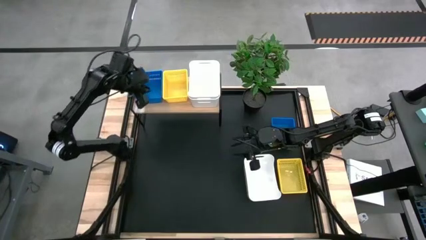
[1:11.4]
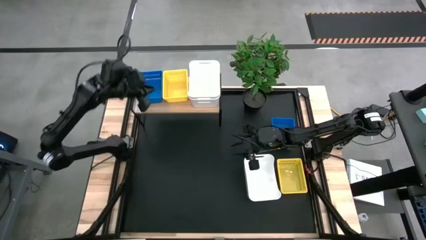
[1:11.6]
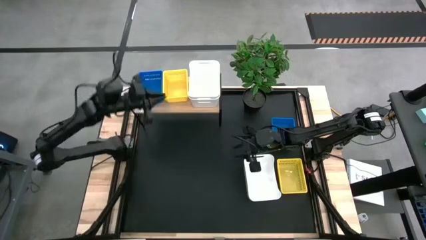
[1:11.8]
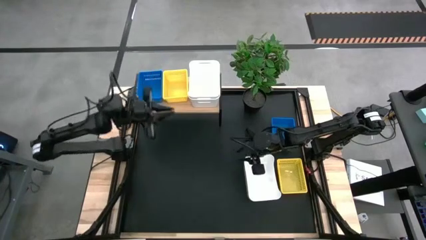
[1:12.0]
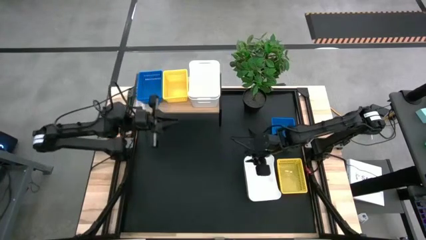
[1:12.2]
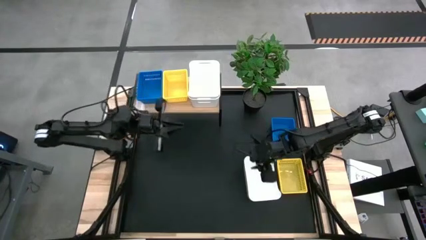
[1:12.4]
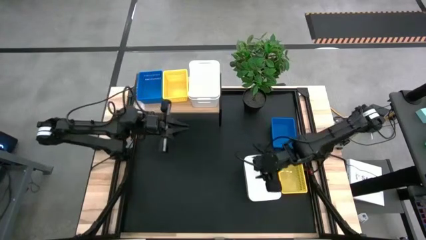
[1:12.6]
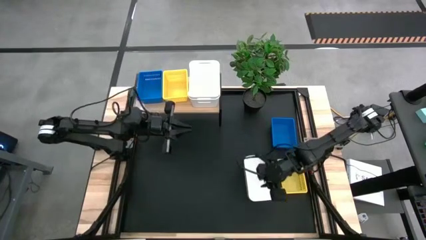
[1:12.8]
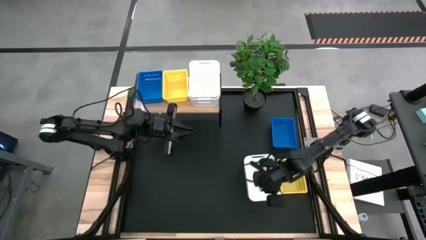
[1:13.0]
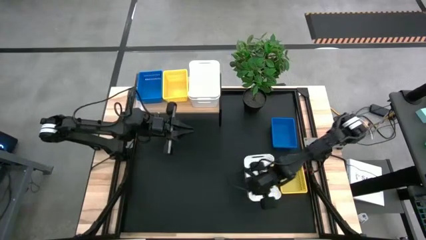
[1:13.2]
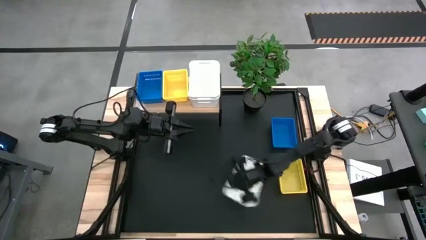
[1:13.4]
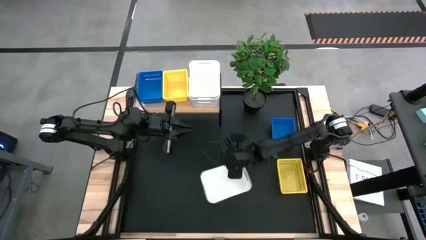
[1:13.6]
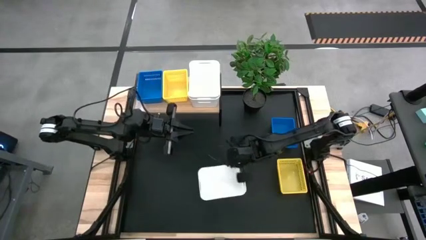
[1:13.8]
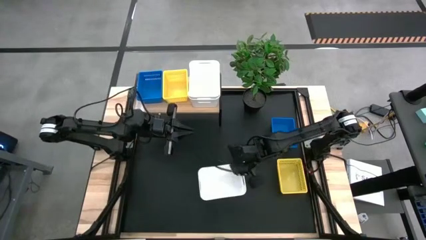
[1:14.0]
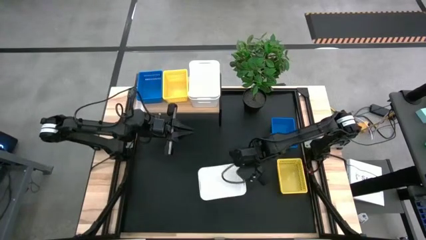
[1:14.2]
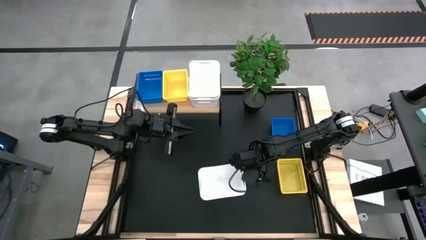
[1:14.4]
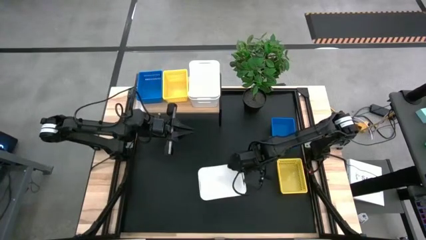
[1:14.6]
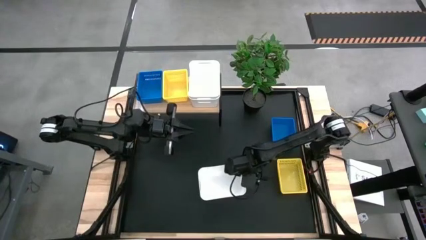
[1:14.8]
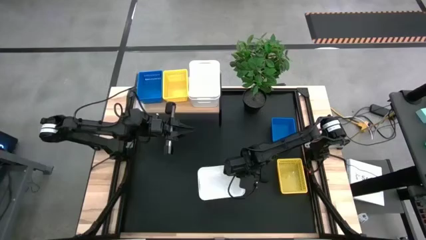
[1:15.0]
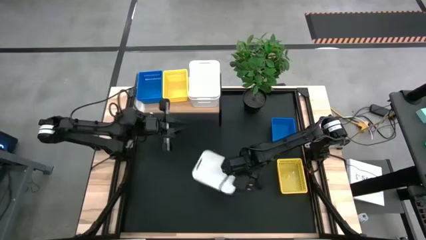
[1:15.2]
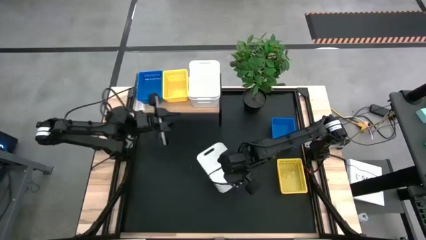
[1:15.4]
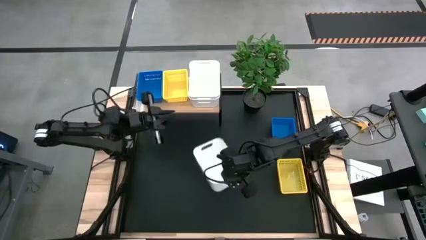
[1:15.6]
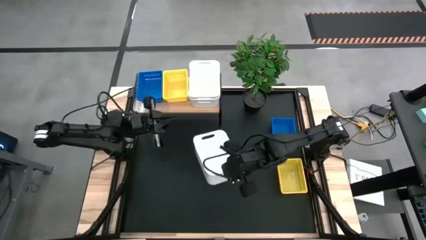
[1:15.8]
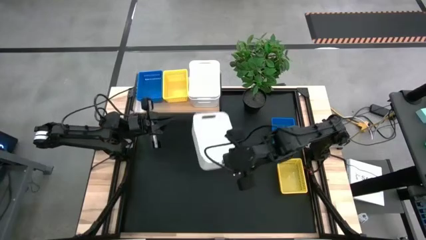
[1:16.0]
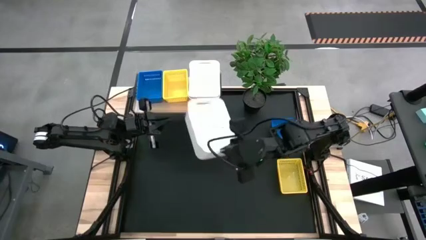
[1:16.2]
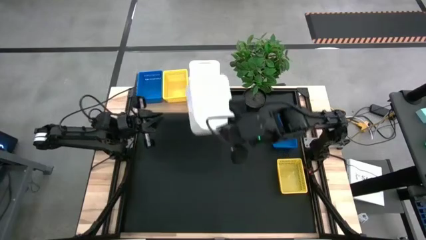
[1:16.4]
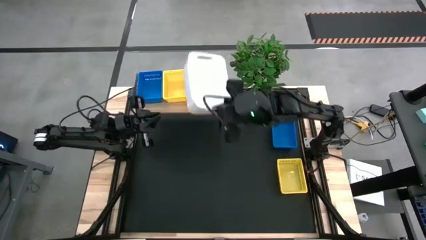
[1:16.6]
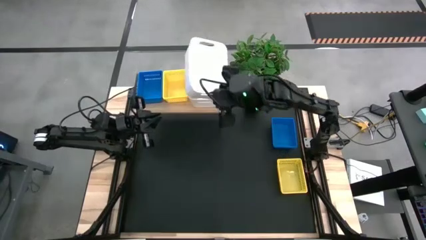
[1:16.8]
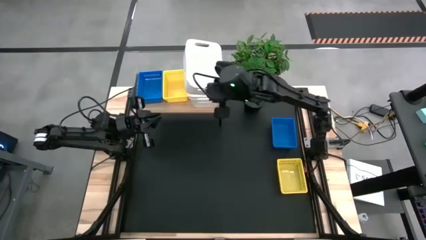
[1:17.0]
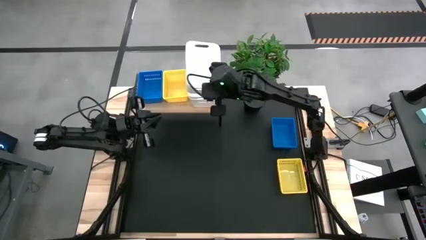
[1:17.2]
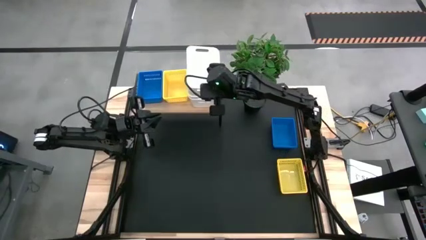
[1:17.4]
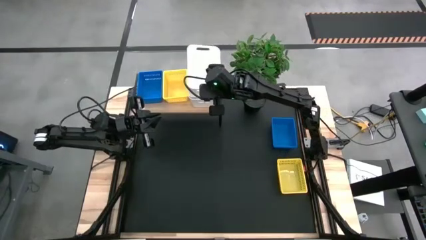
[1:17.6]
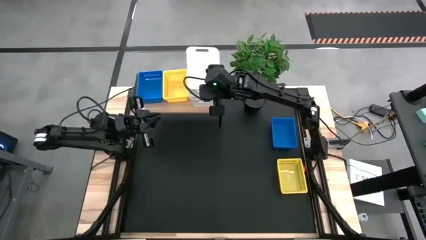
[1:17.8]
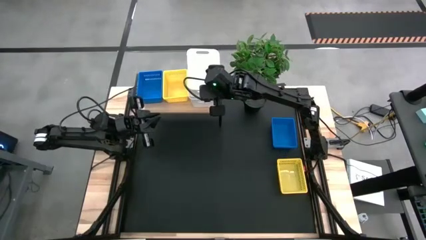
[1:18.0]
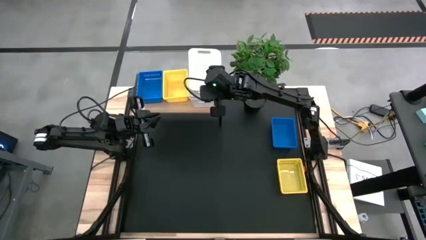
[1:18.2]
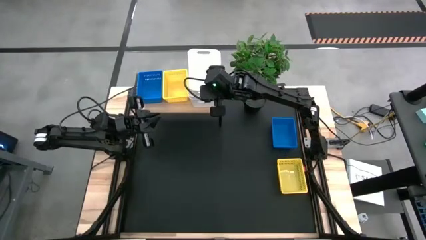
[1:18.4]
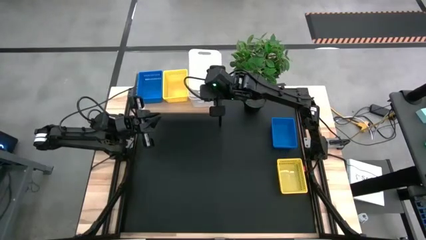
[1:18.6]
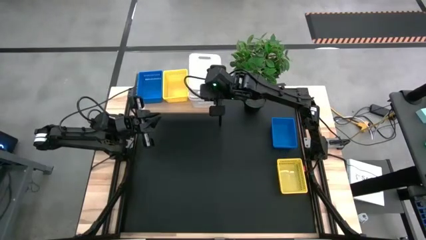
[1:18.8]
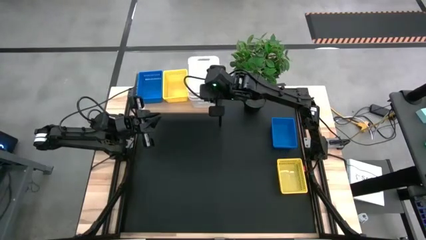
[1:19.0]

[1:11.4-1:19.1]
Task: Stack baskets on shelf by color
Stack the white bin into the white bin on the shelf

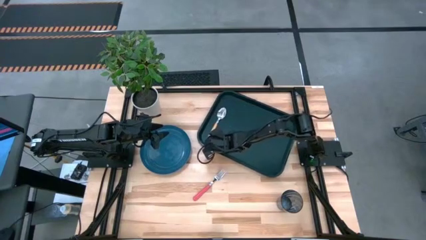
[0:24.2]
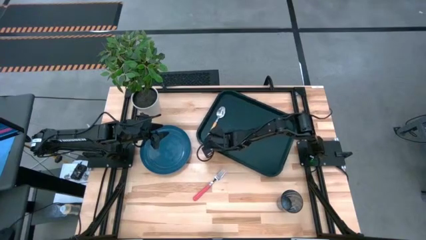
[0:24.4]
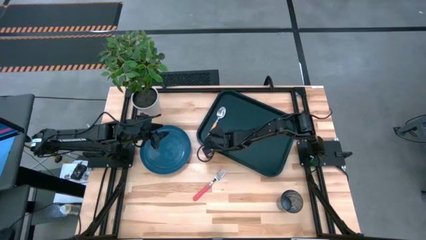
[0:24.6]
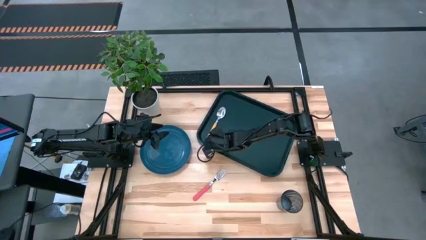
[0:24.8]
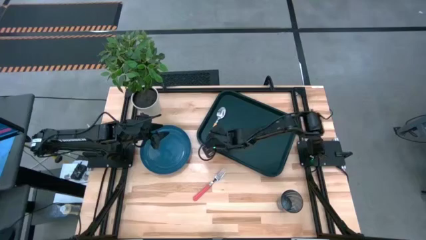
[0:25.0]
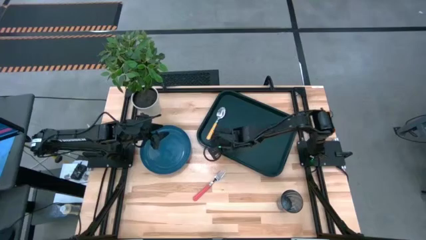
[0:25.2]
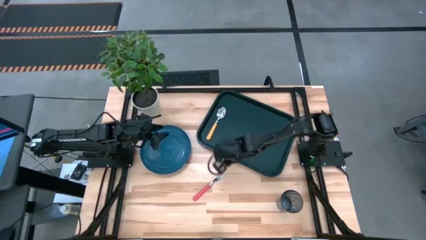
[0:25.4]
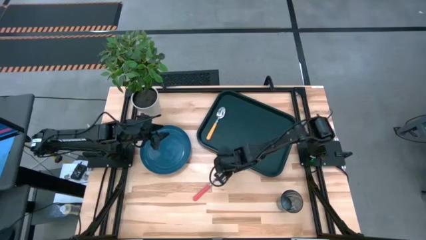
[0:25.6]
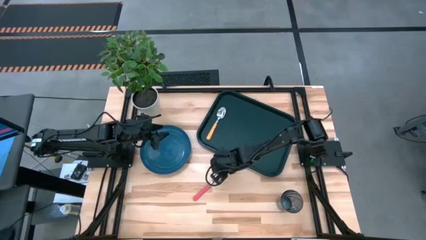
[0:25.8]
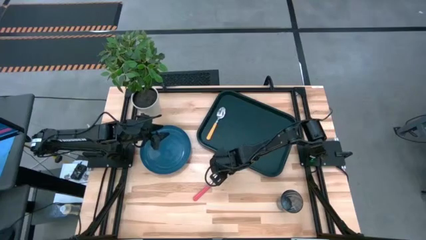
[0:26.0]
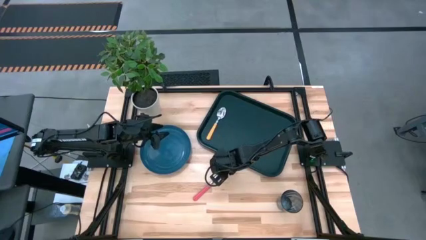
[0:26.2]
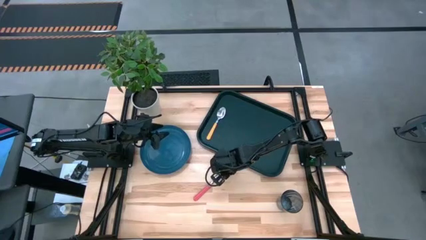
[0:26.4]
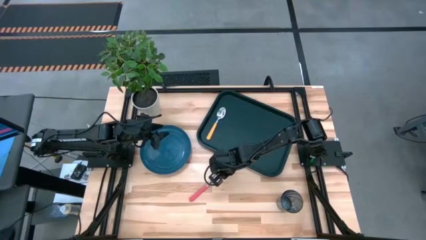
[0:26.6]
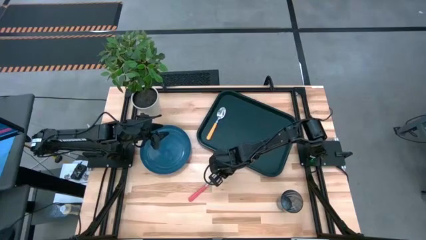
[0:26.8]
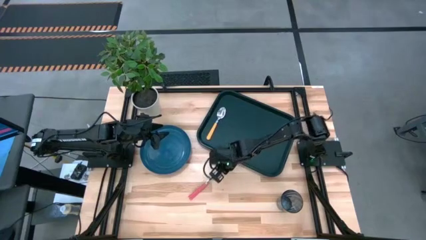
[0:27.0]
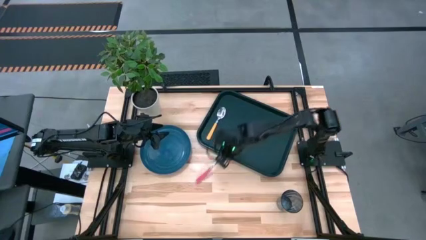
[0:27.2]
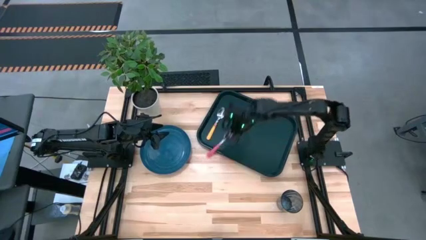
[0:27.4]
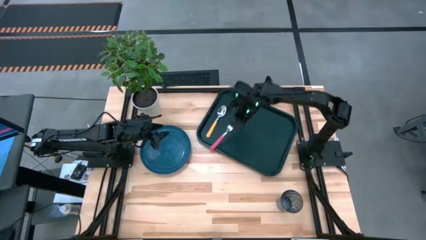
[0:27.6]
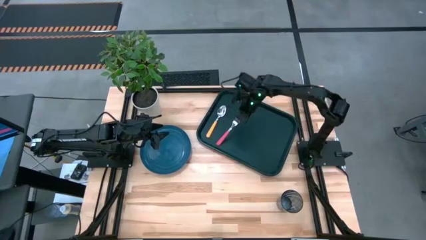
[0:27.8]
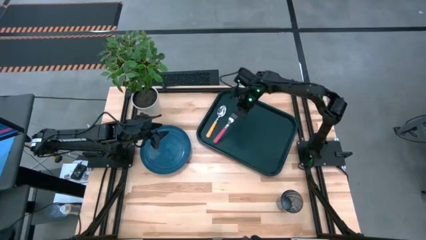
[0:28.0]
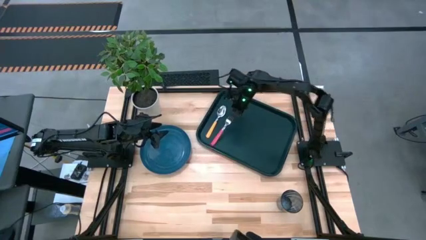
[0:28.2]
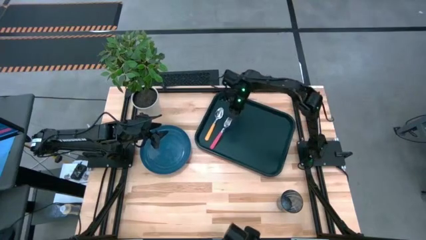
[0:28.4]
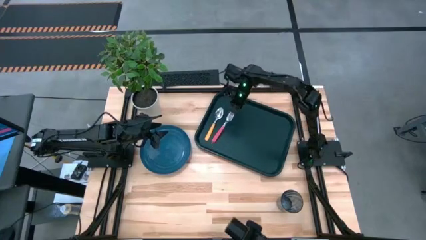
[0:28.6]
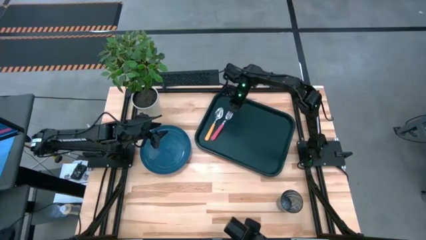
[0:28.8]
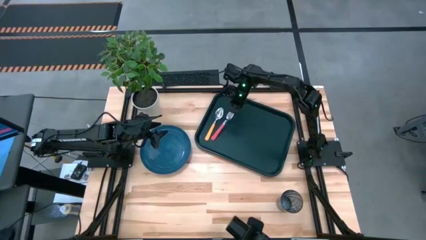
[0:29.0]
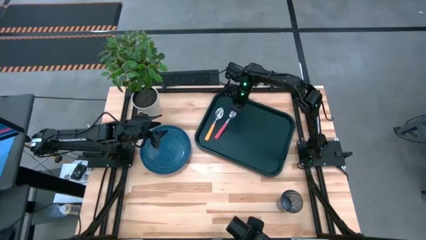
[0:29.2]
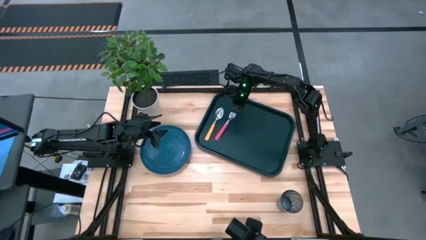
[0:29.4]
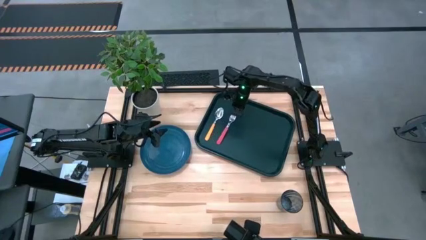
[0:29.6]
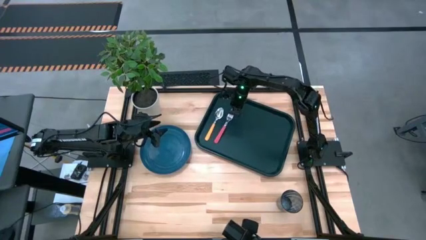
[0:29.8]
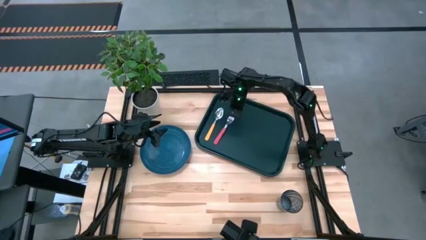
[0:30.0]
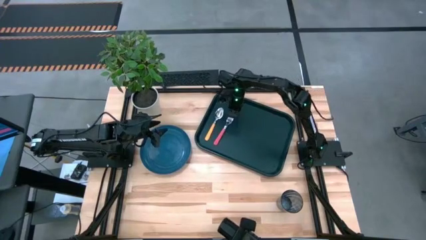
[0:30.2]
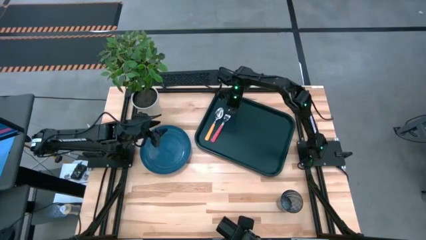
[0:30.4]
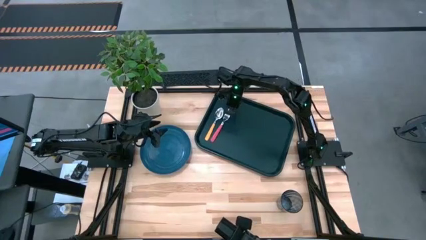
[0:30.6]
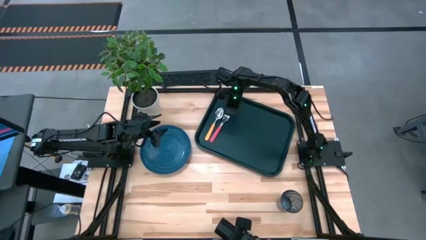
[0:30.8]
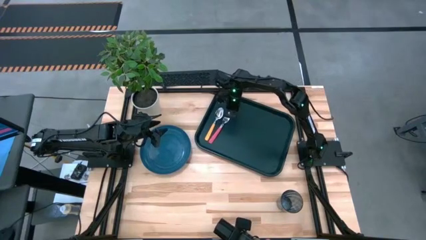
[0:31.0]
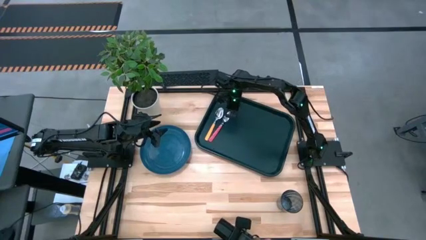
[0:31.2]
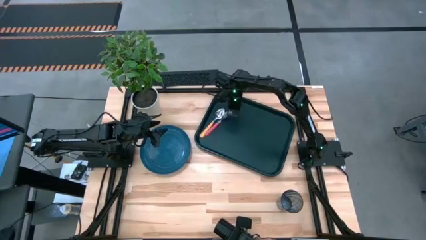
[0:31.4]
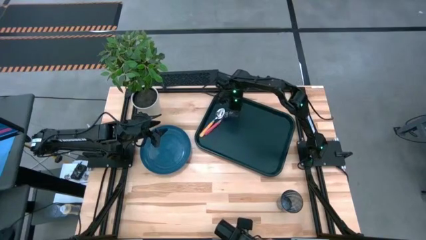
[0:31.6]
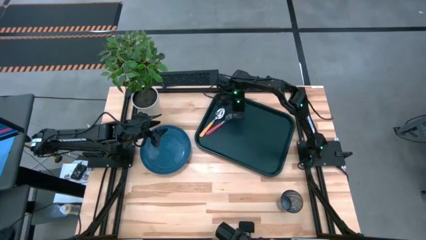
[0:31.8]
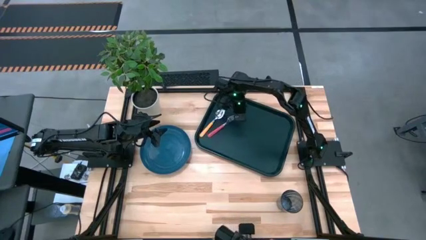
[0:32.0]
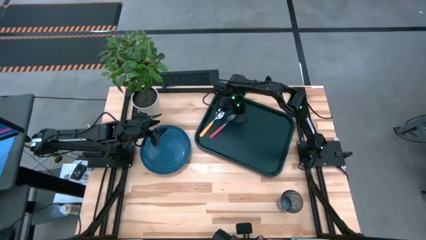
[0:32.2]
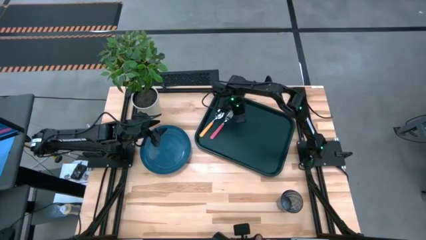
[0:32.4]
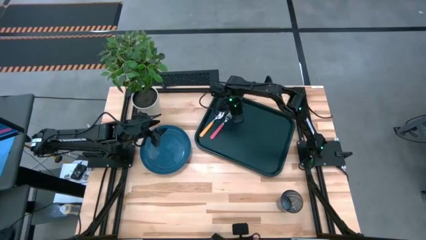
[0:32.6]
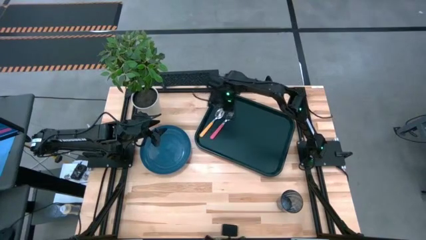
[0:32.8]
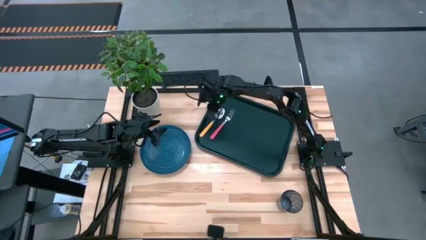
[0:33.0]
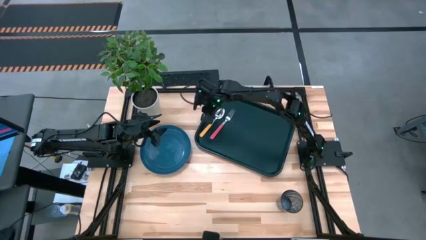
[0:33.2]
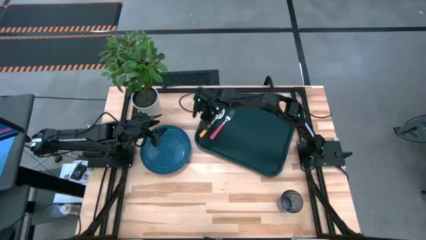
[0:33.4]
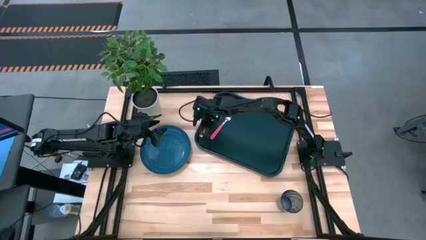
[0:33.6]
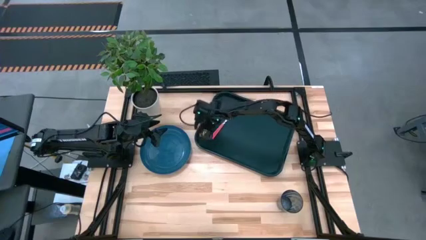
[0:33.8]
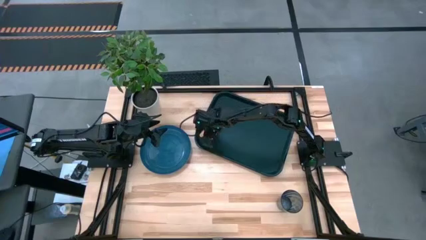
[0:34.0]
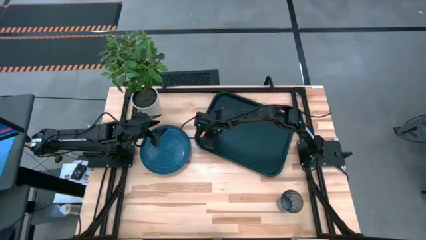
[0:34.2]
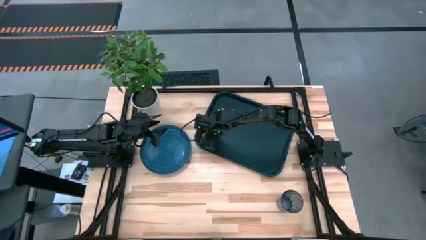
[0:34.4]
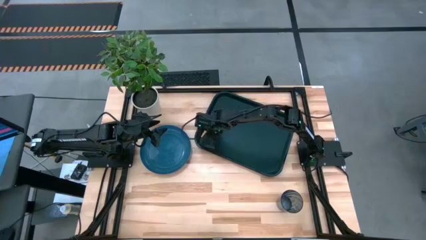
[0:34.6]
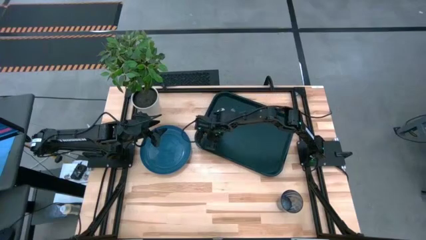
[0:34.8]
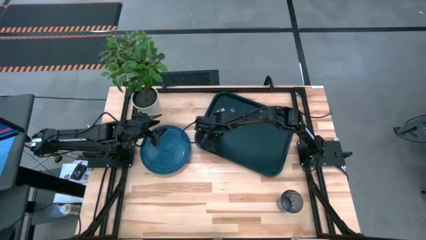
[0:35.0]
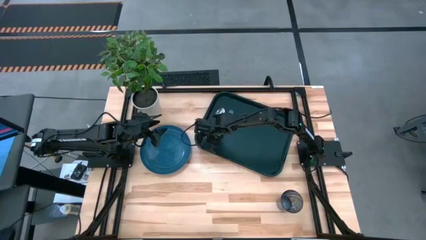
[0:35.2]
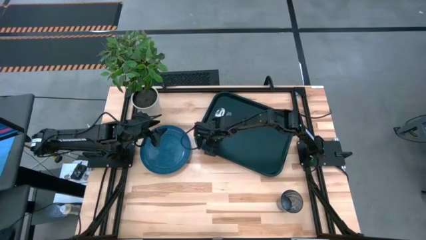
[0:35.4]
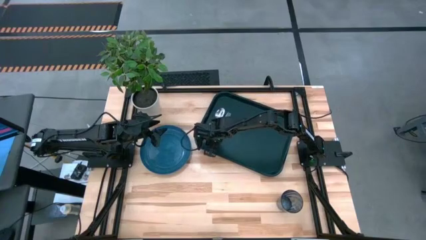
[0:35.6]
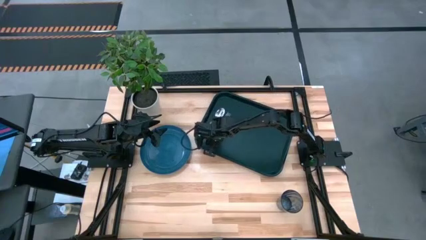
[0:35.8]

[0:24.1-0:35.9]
Task: Pick and place plate/cup/fork/spoon on tray
Put the pink fork on the black tray to the right of the orange spoon
